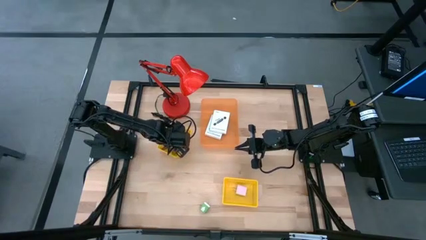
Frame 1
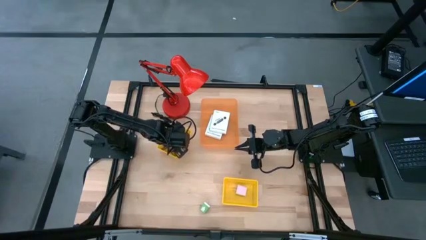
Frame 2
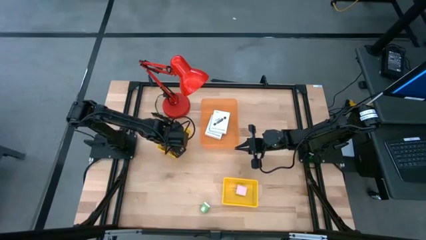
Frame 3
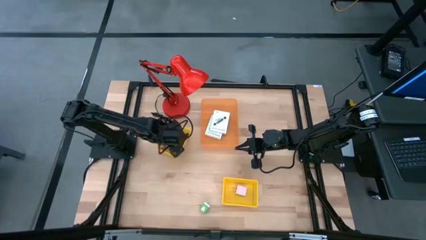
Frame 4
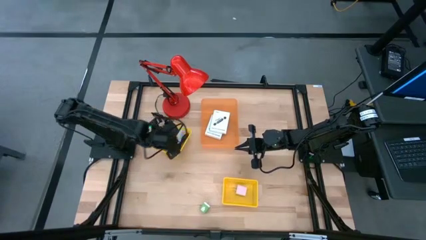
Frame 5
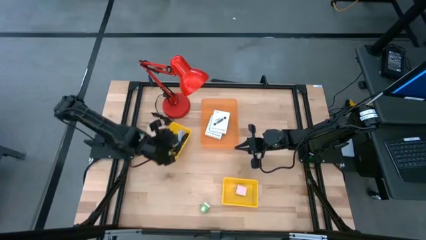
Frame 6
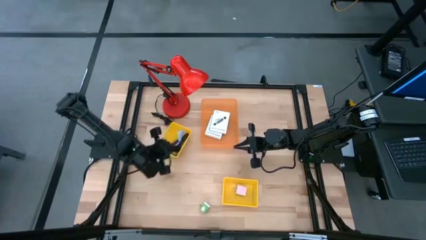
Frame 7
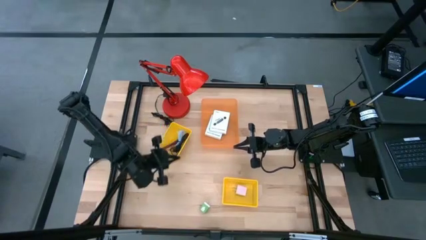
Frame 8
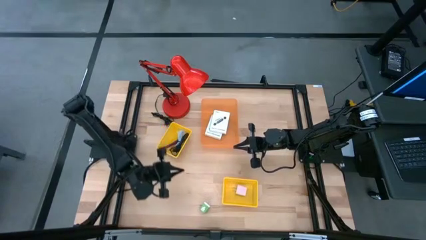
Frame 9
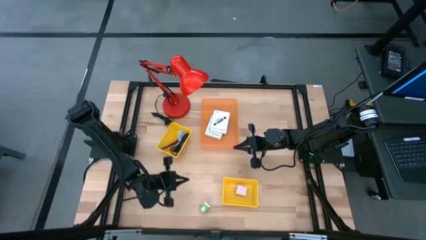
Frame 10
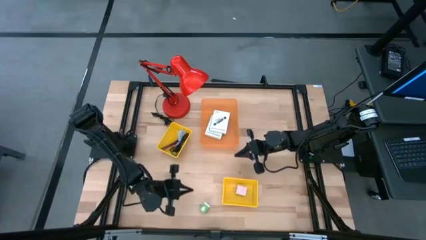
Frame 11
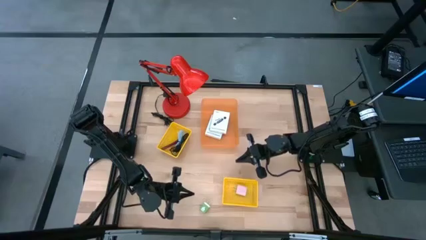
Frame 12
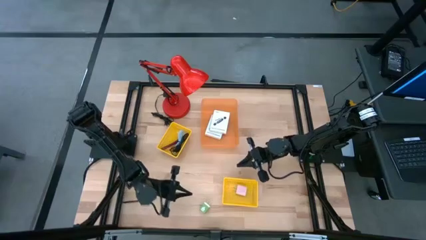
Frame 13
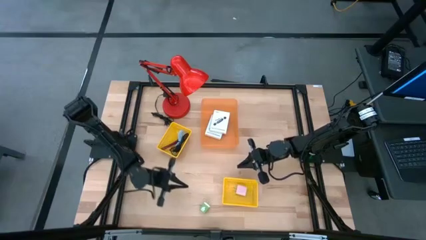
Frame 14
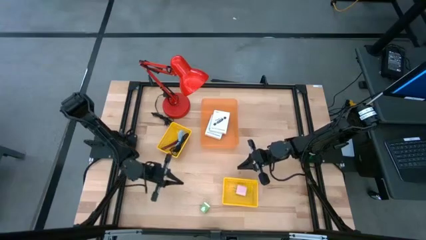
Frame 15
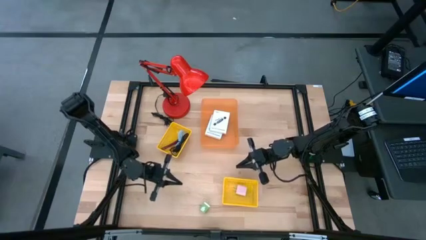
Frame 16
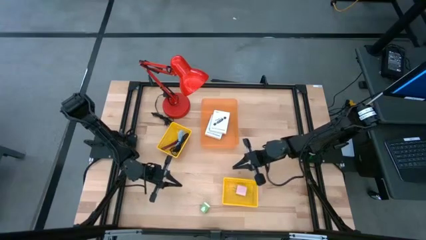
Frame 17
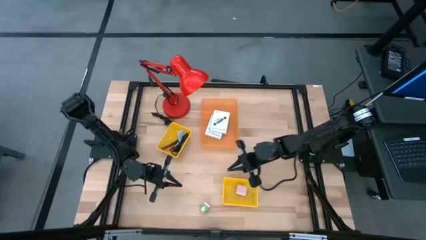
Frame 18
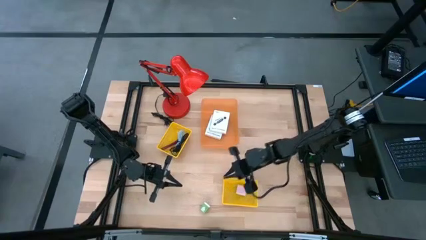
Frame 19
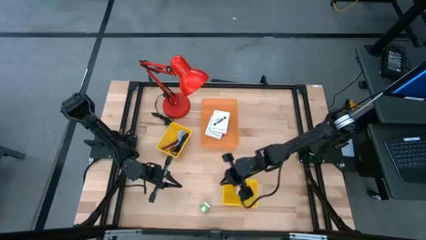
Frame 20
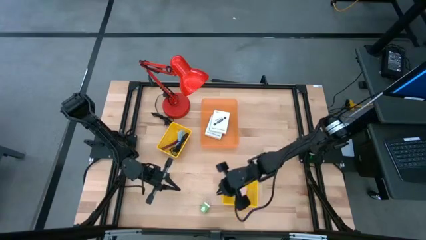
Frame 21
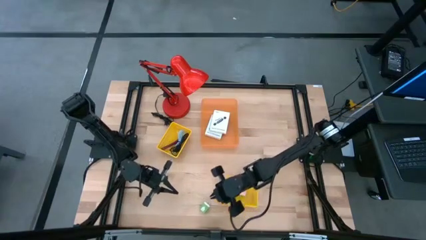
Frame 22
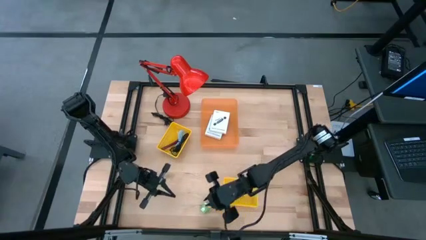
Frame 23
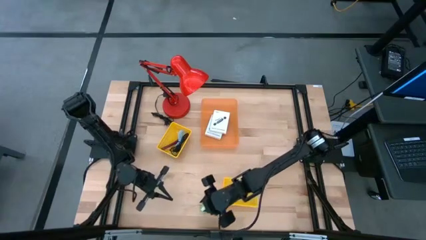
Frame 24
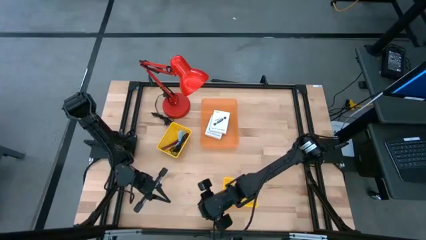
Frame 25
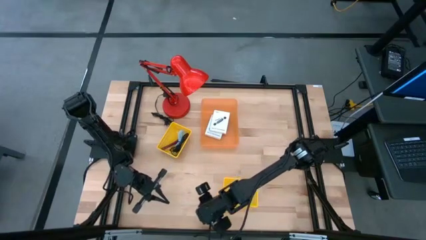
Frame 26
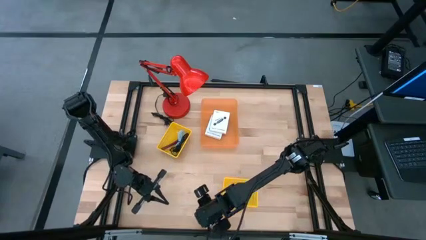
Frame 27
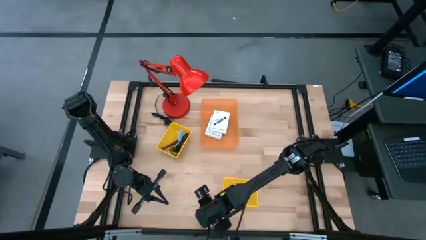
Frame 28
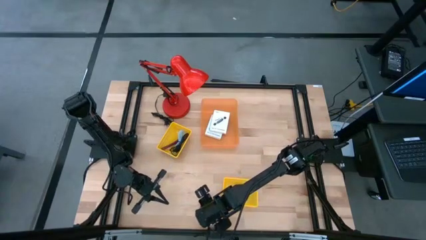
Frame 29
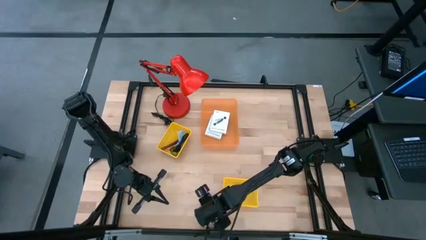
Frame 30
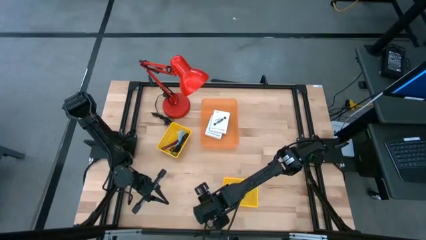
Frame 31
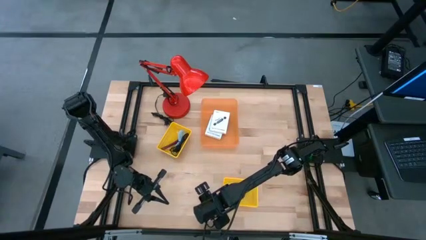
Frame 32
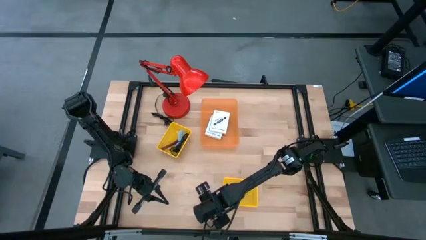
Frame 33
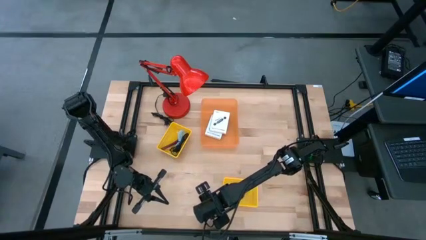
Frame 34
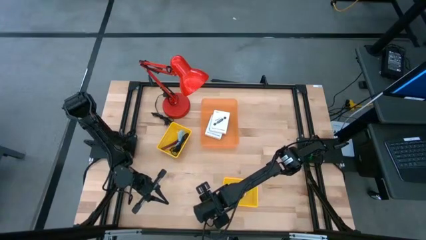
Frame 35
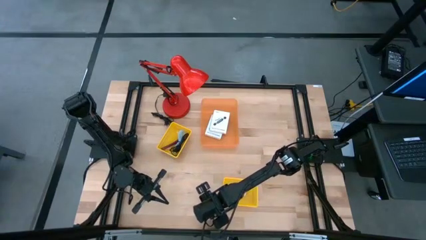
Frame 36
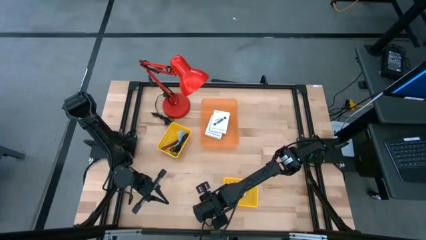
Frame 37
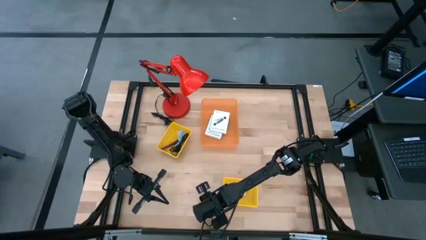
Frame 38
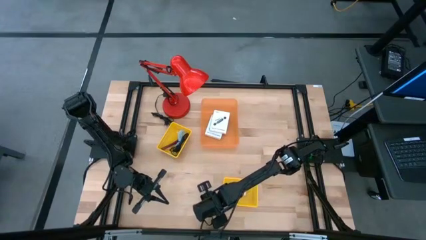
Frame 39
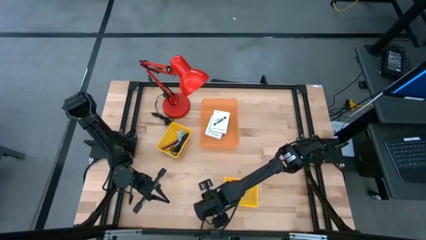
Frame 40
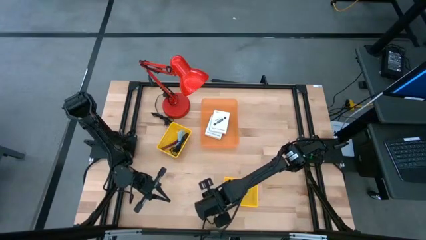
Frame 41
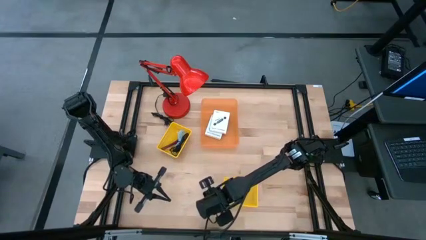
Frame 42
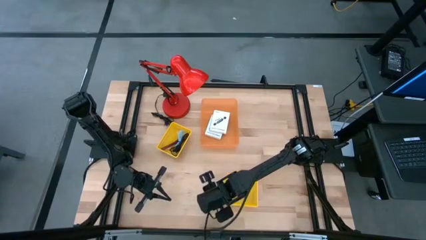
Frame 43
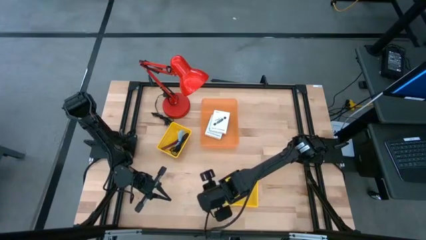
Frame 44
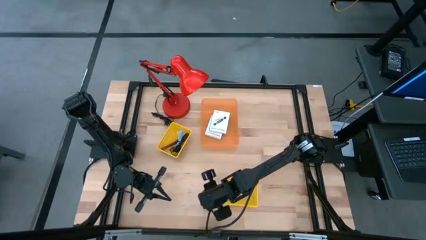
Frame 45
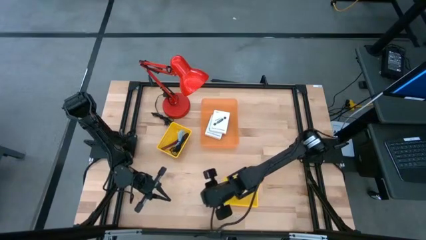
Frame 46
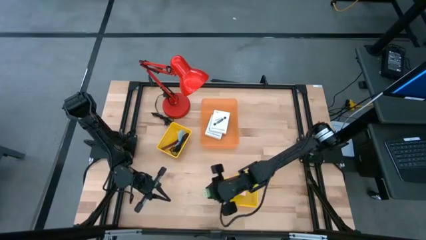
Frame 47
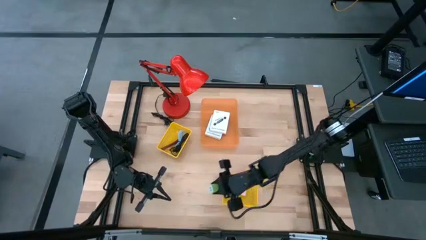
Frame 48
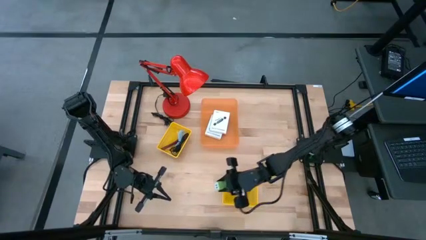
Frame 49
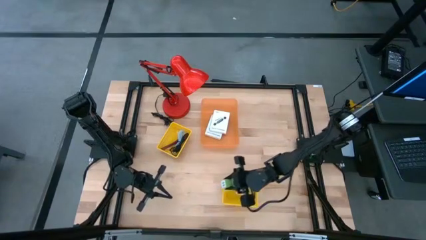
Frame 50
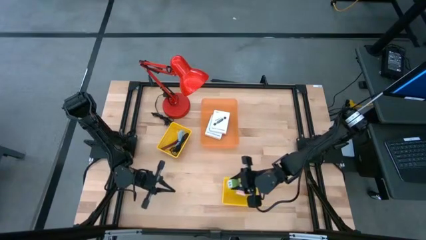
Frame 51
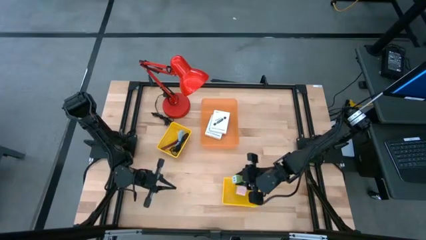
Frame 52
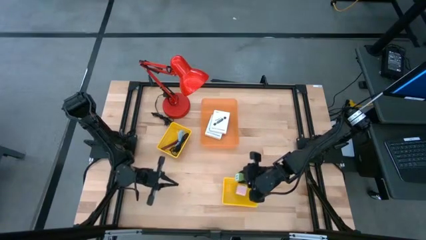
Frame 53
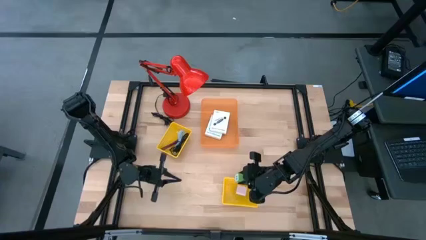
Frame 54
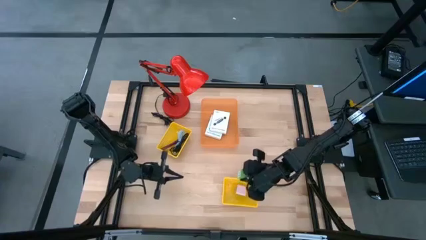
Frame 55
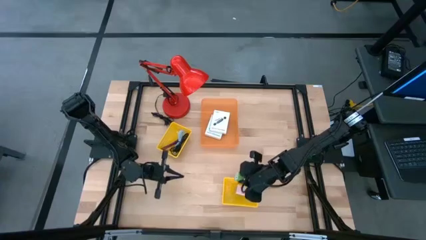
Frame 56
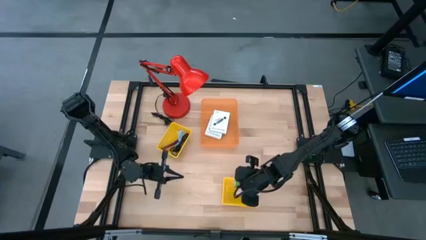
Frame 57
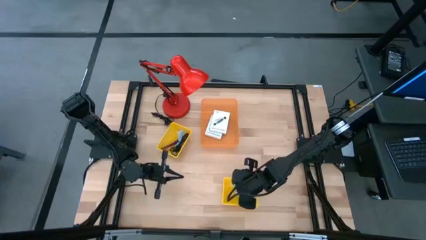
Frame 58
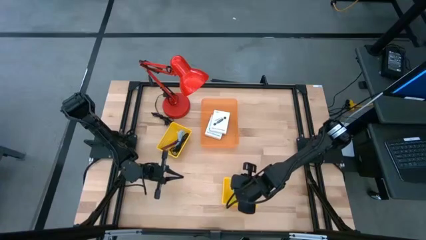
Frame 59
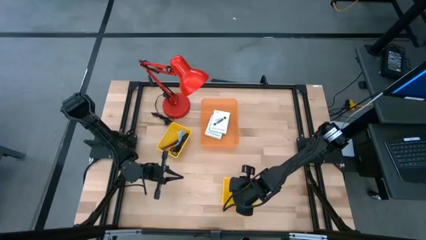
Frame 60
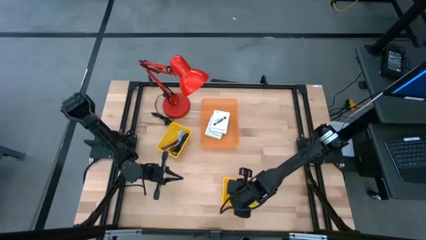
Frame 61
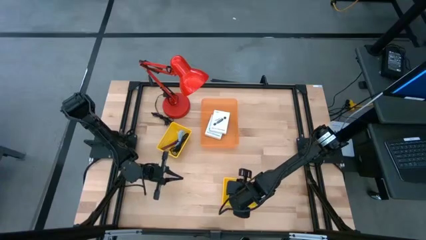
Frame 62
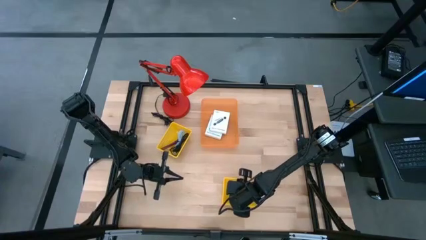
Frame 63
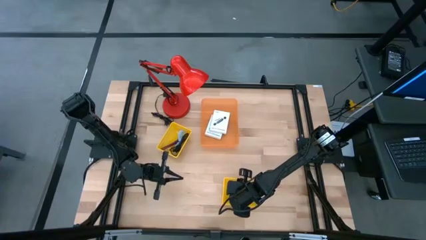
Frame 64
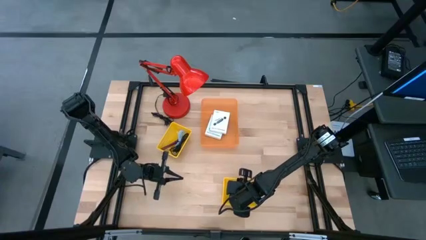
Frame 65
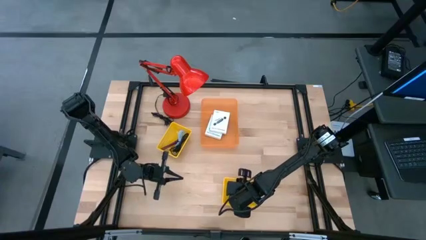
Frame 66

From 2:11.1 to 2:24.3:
Task: Pick and place items into bin
Put the green charger adapter into the right yellow bin
